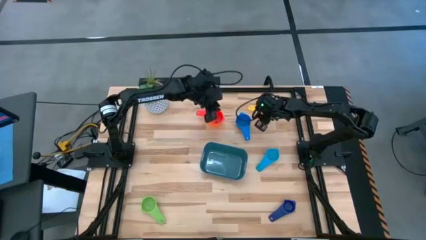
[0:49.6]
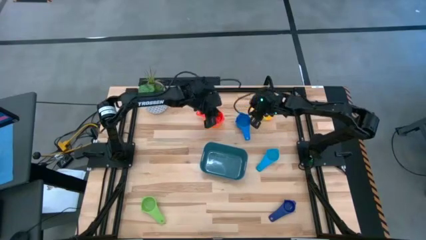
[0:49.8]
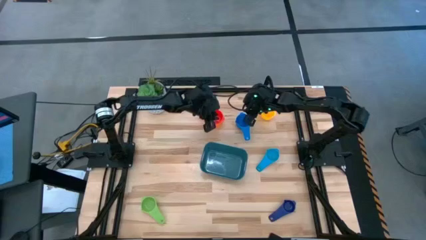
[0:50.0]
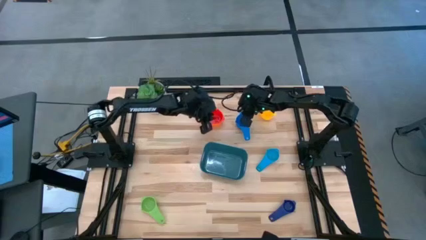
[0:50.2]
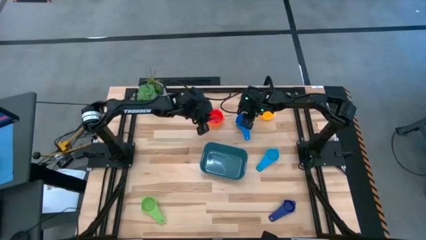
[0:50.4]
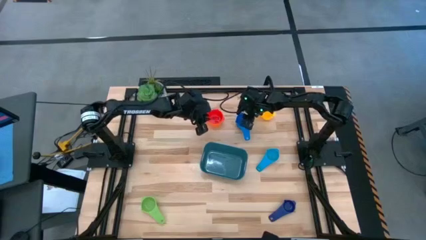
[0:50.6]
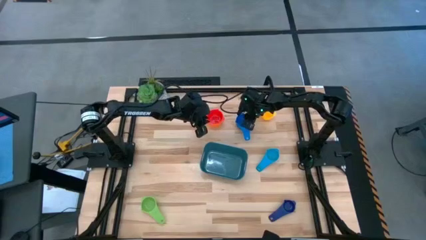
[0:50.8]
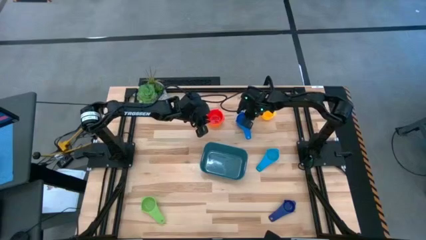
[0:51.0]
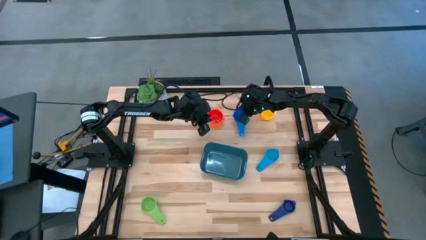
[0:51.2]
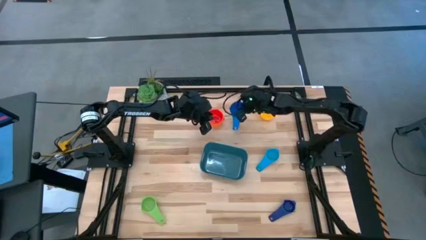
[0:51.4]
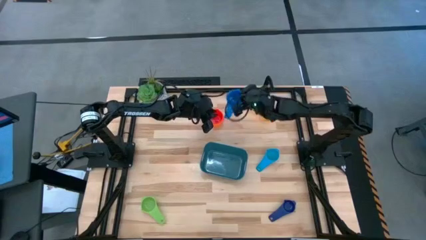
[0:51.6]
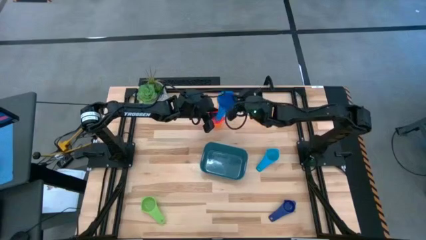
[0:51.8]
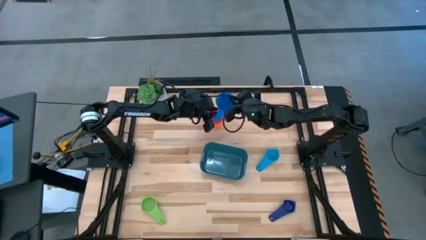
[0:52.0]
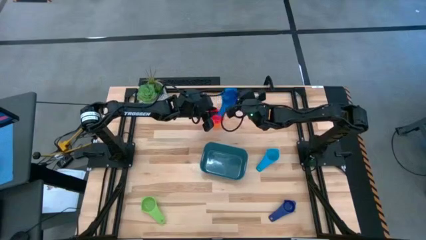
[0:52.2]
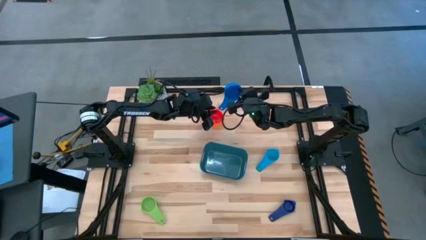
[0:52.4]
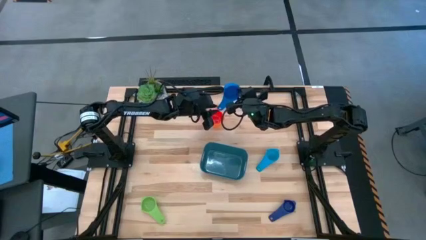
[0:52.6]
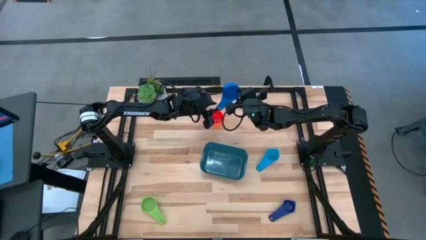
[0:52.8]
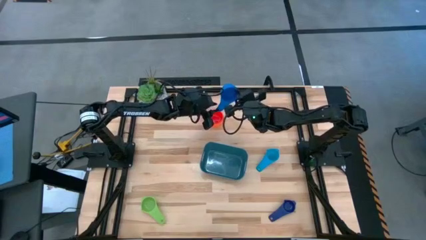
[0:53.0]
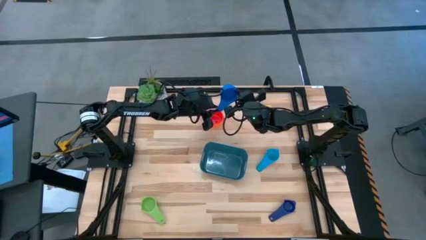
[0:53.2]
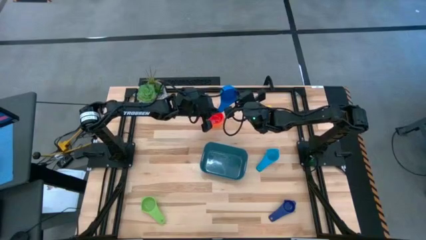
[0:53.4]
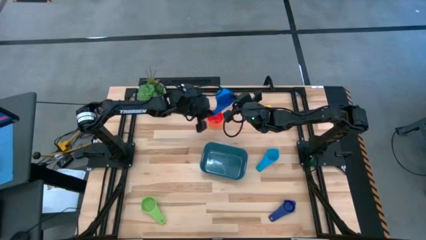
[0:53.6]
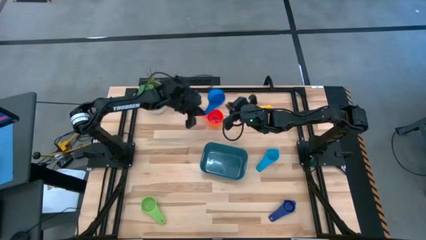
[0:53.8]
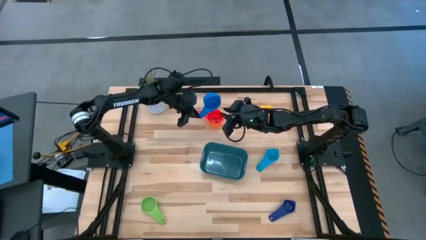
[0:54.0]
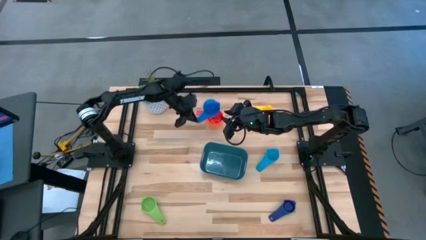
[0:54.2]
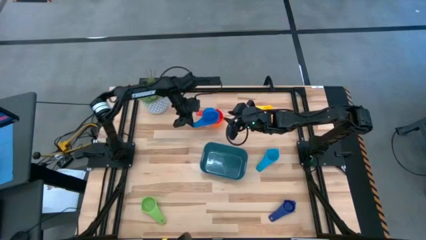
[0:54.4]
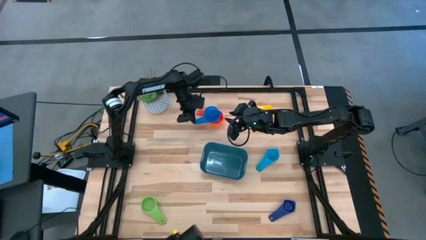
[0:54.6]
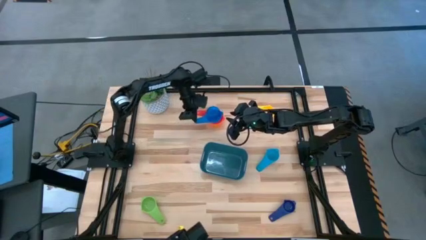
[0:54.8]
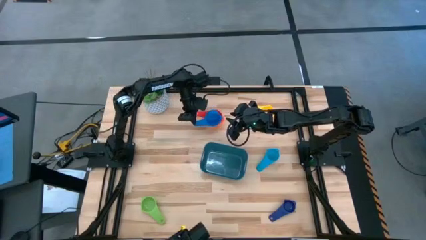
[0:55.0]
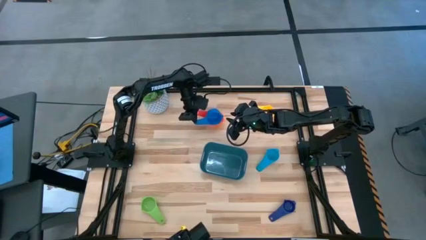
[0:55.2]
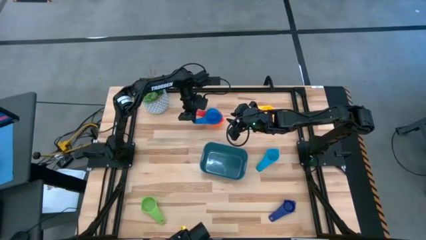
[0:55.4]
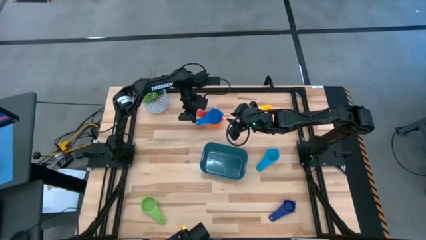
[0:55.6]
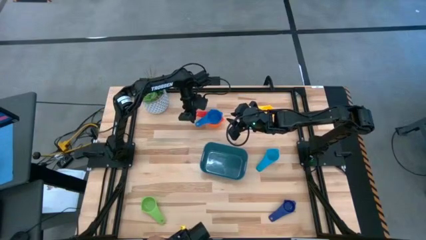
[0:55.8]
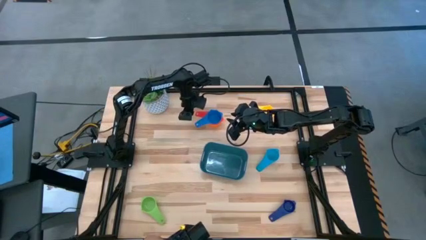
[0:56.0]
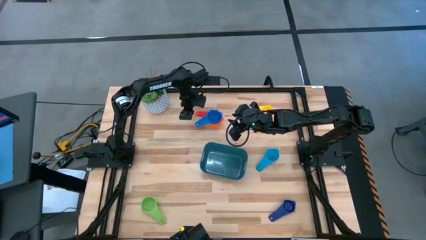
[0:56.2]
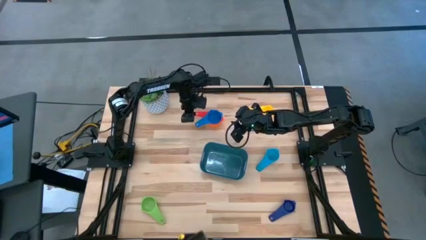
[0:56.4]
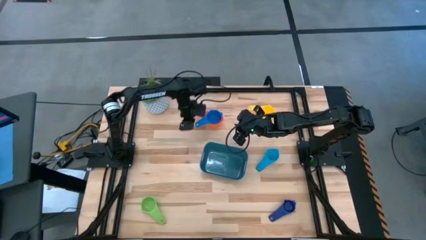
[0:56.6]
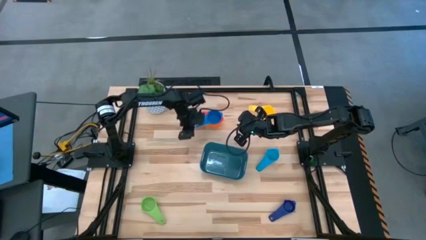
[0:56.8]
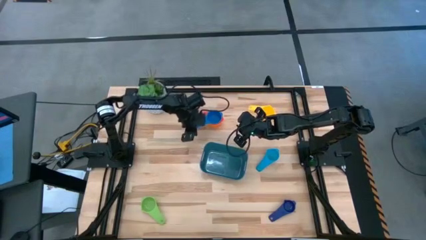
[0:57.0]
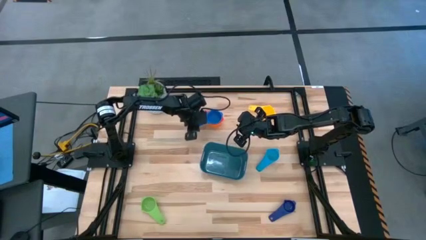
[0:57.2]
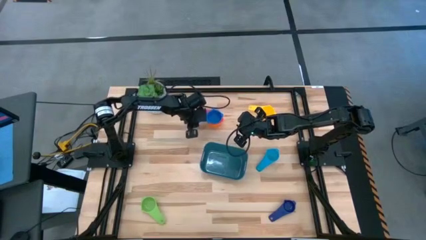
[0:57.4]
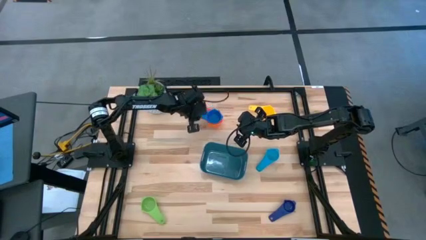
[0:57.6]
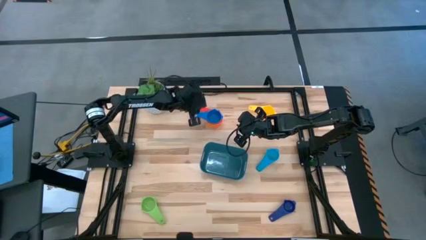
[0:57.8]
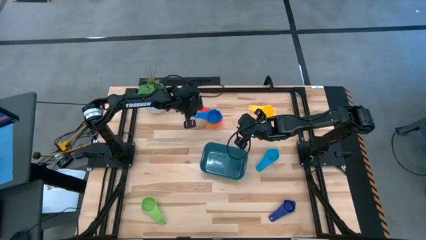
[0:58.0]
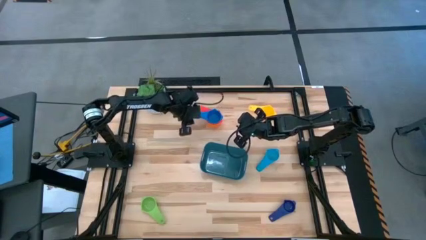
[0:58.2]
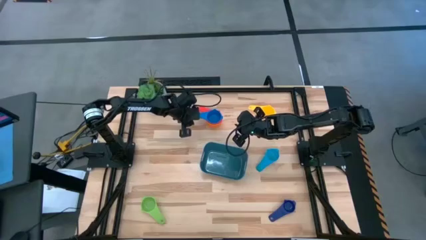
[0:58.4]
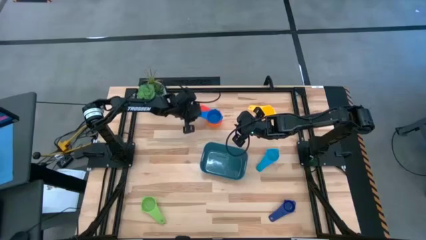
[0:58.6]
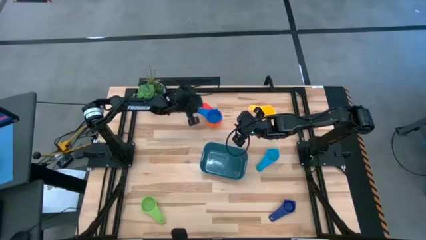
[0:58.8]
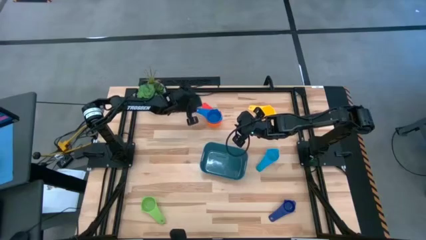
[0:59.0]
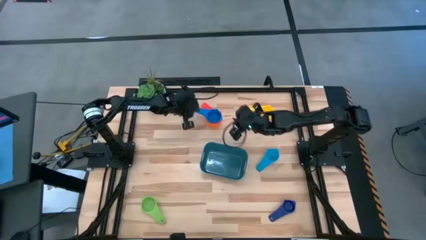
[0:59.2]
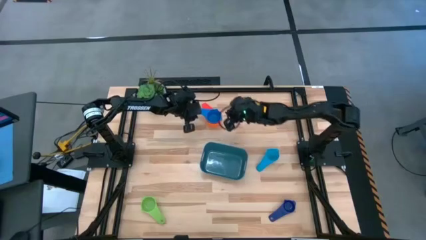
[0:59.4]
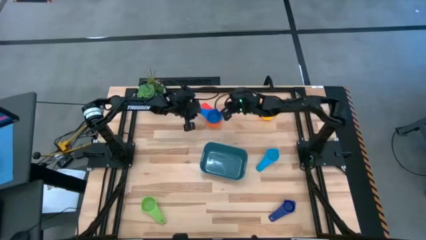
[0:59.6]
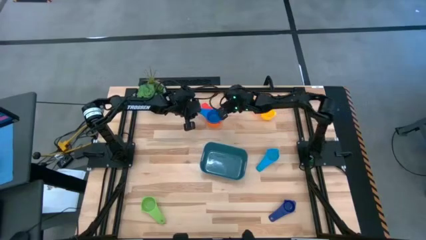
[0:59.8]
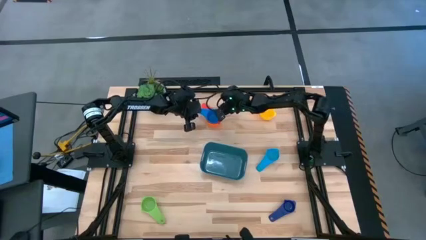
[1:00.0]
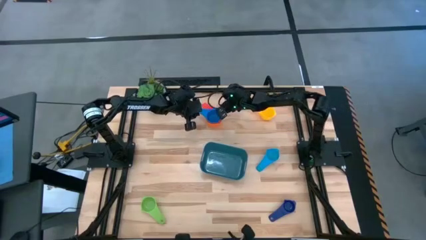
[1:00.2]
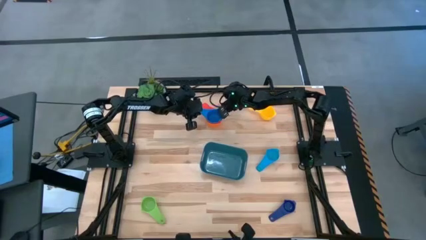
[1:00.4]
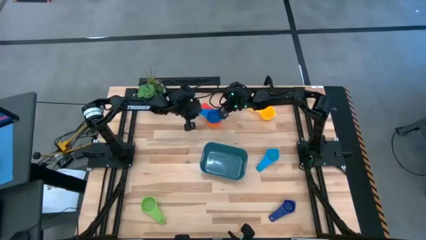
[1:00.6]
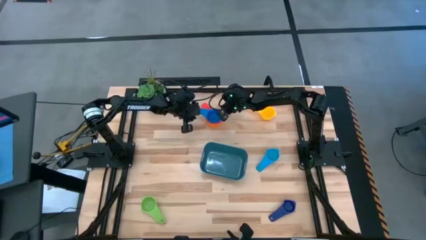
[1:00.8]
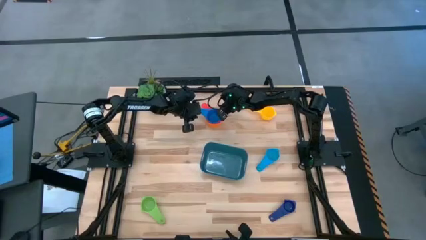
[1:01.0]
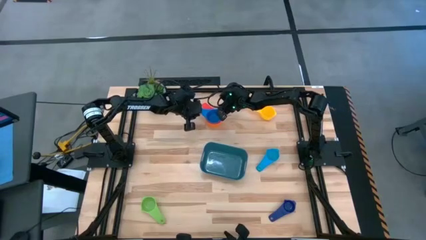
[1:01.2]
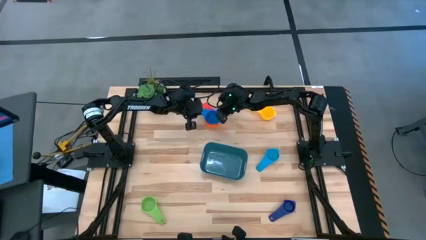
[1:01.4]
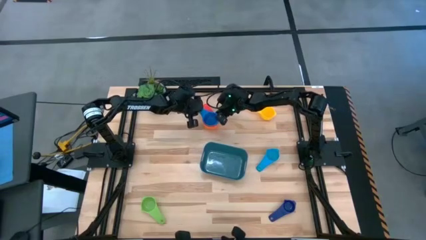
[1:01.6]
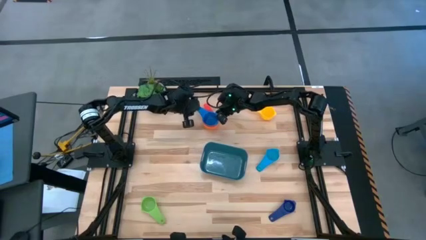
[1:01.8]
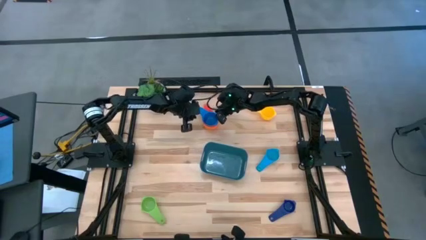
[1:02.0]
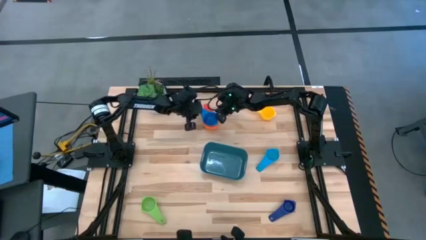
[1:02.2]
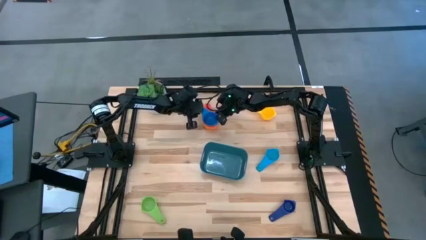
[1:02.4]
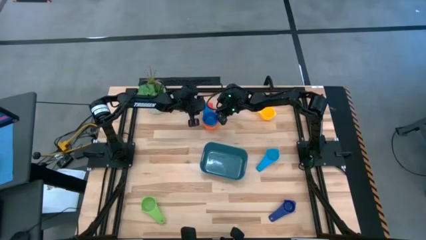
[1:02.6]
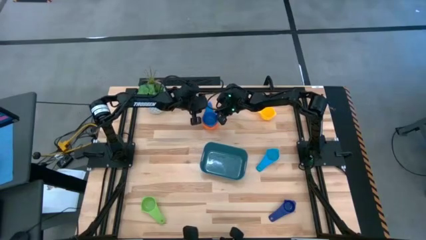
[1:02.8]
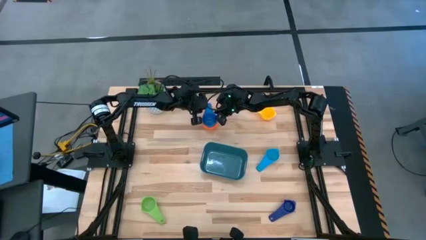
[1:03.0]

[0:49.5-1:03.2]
Task: Nest measuring cups in basket
Stack the blue measuring cup on top of the red measuring cup

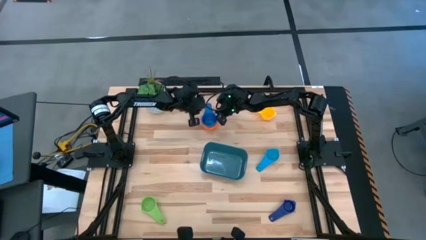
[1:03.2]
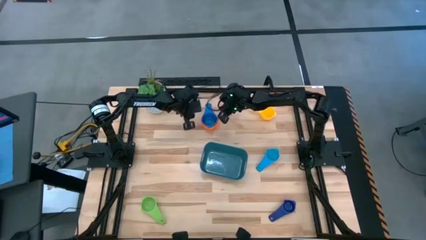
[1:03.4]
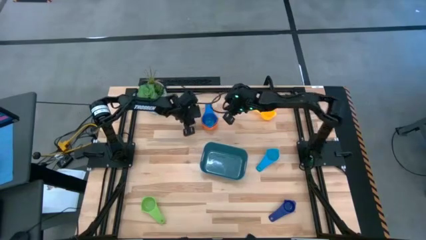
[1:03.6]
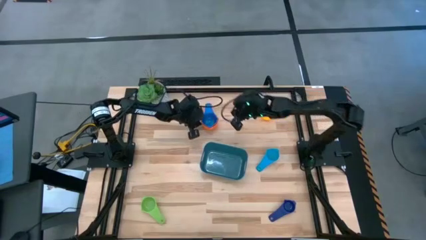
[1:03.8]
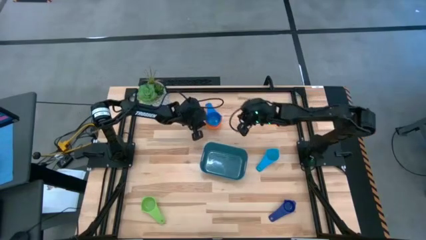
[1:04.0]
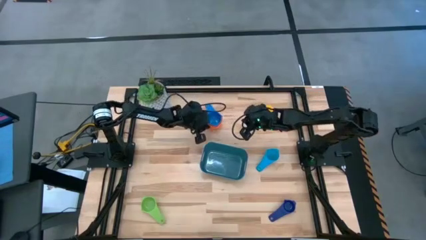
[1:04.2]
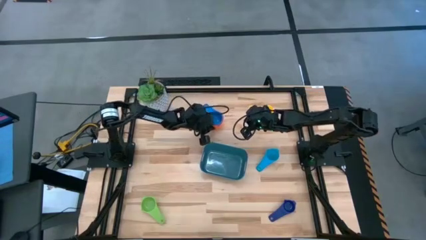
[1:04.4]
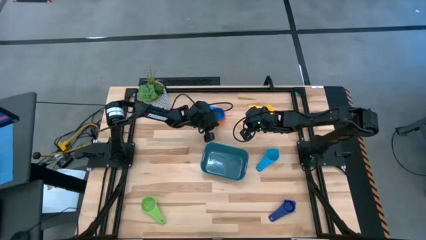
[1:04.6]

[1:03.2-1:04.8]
Adjust the nested measuring cups

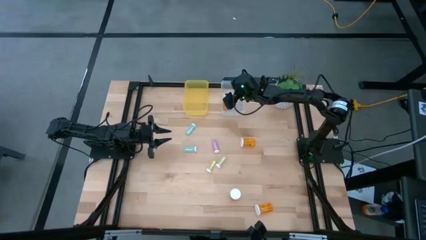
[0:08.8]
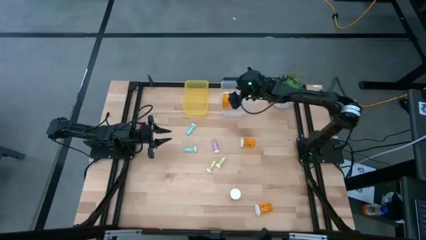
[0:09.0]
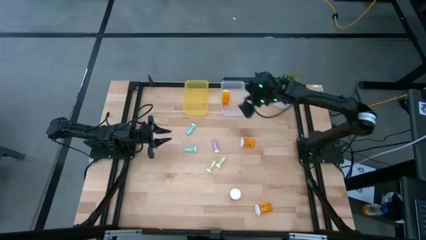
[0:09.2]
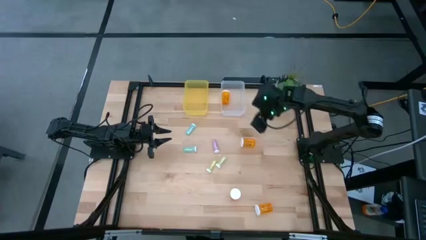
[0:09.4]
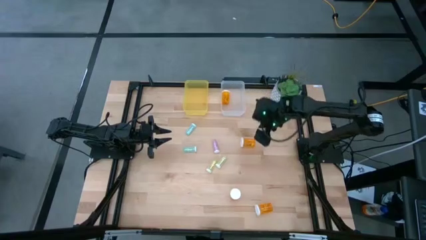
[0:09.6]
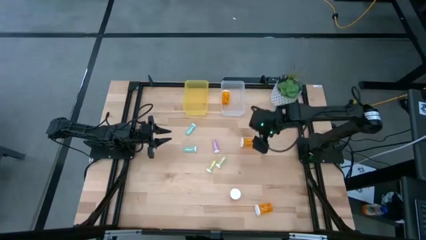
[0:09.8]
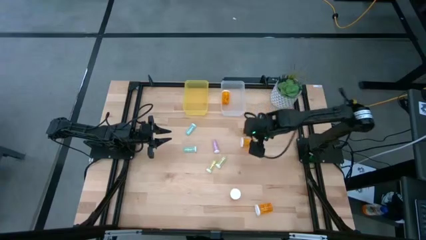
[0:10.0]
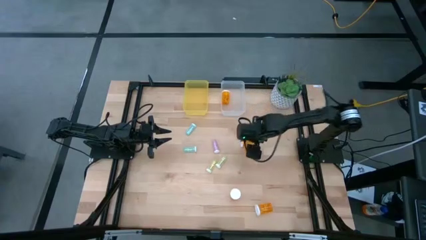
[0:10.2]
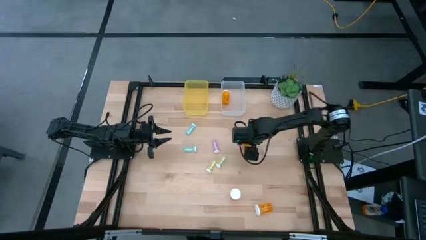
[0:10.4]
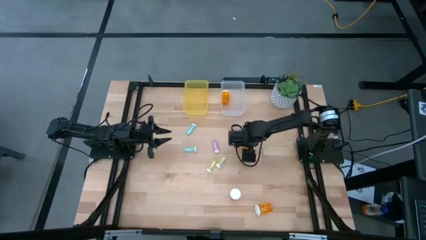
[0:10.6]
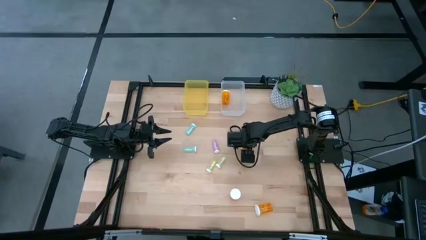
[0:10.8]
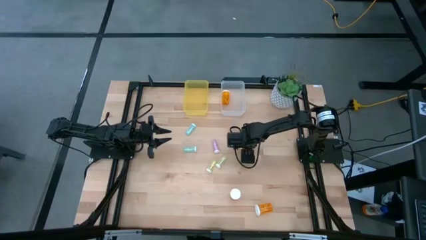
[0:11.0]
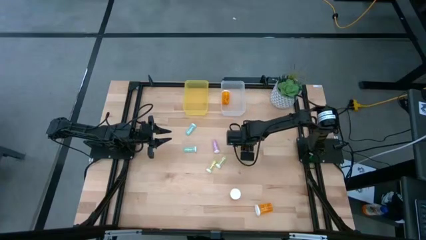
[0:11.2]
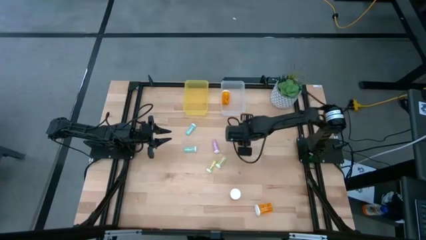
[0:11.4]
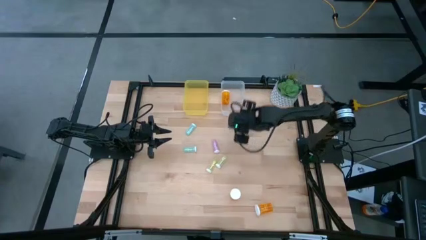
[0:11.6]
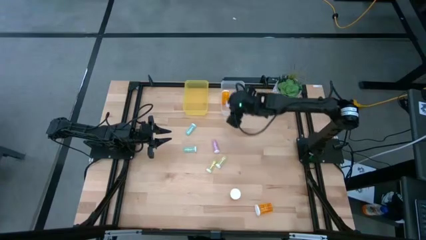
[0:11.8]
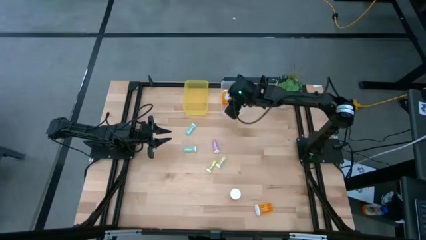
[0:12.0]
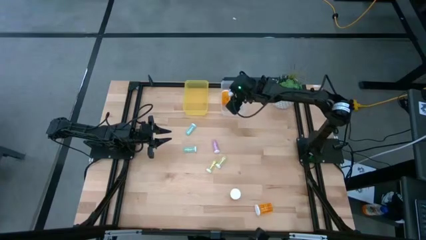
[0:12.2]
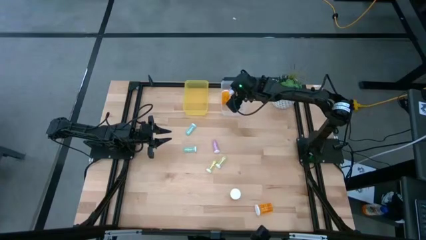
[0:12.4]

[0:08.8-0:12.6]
Task: Pick and place medicine bottles into bin by pill shape (circle, oval)
Put the orange capsule bottle into the transparent bin
